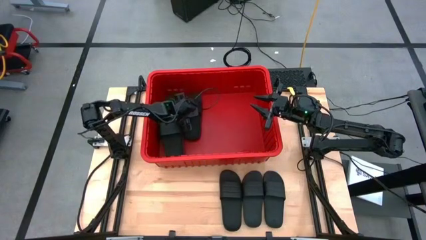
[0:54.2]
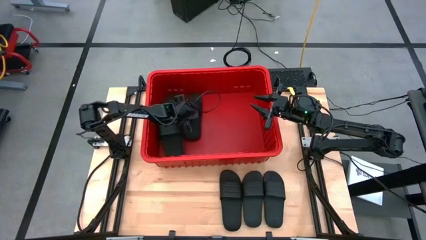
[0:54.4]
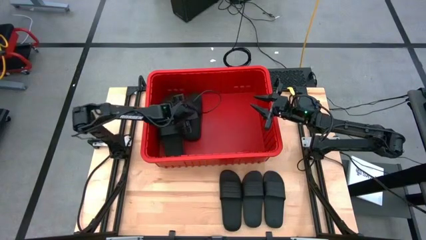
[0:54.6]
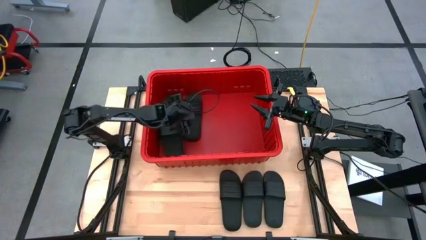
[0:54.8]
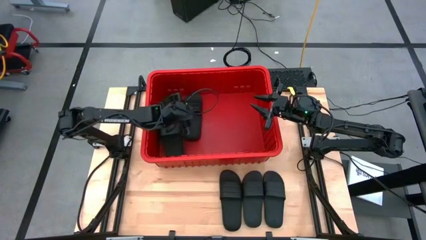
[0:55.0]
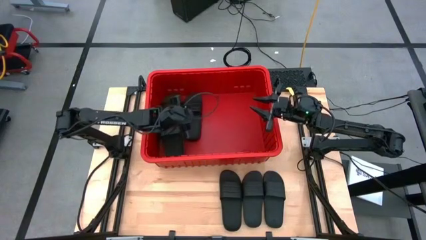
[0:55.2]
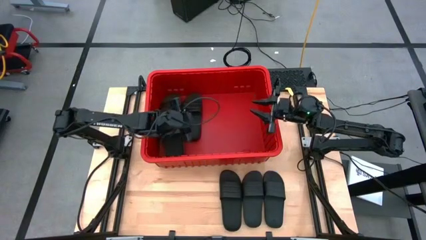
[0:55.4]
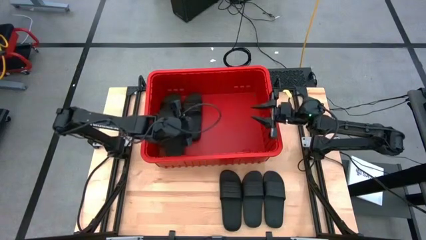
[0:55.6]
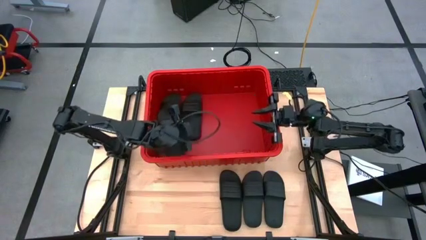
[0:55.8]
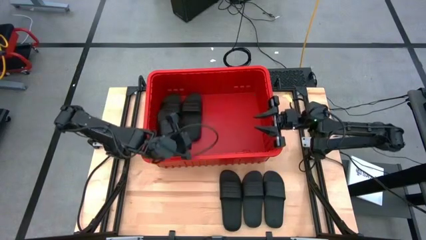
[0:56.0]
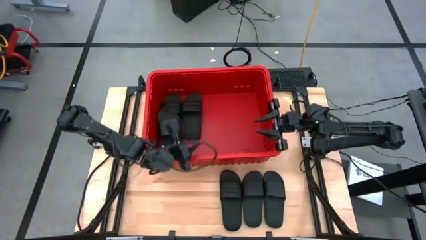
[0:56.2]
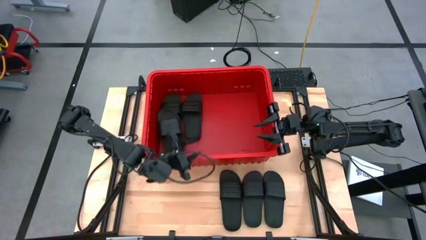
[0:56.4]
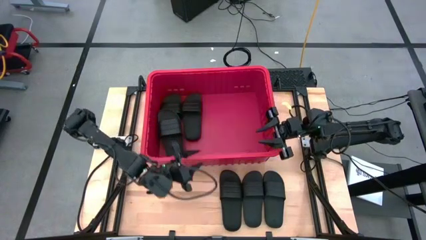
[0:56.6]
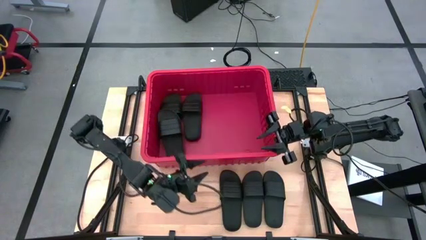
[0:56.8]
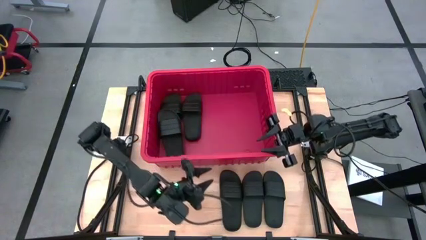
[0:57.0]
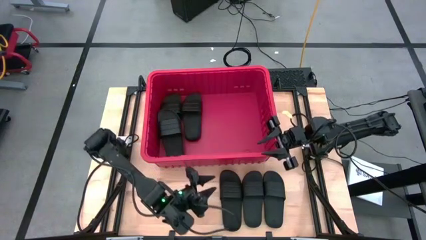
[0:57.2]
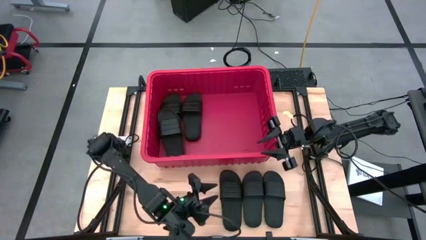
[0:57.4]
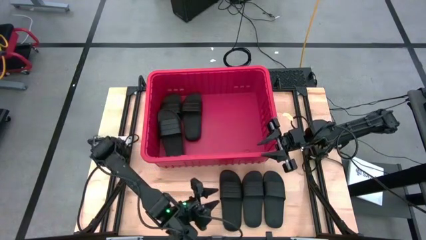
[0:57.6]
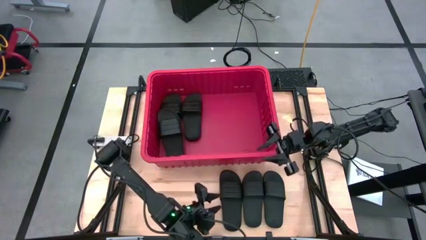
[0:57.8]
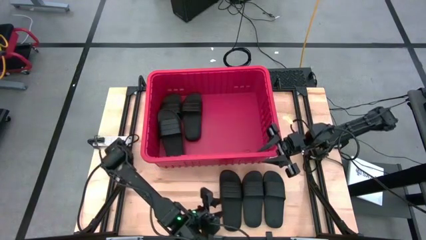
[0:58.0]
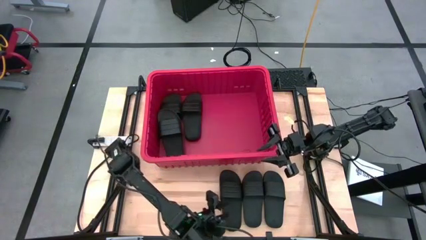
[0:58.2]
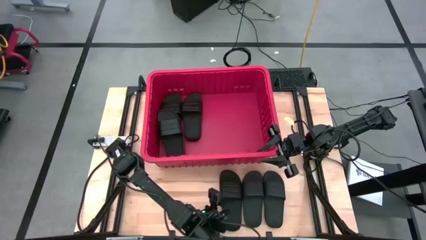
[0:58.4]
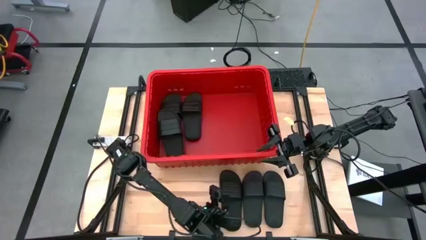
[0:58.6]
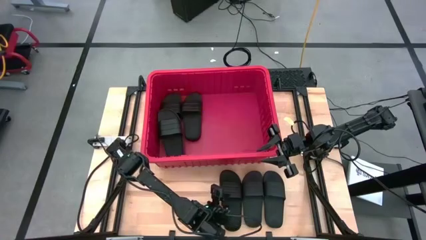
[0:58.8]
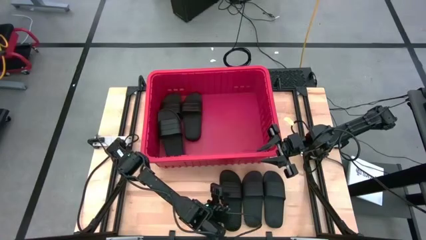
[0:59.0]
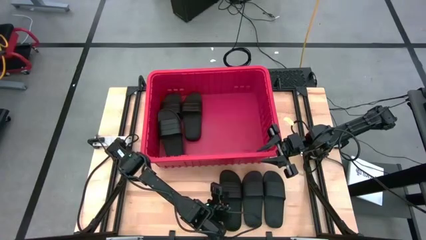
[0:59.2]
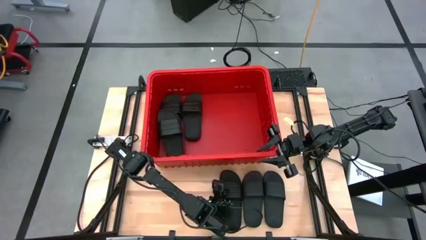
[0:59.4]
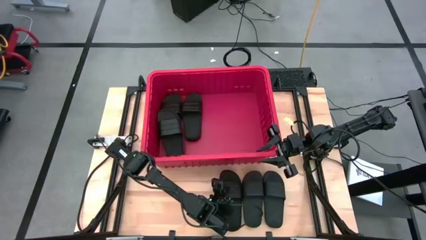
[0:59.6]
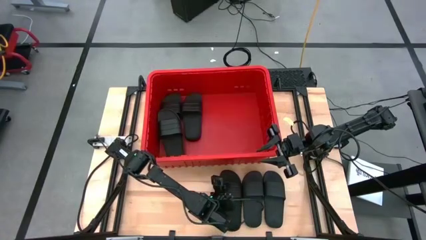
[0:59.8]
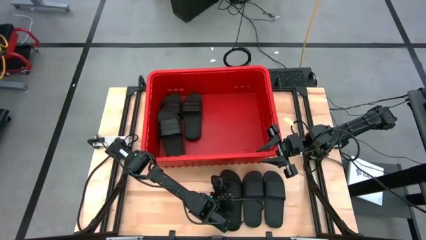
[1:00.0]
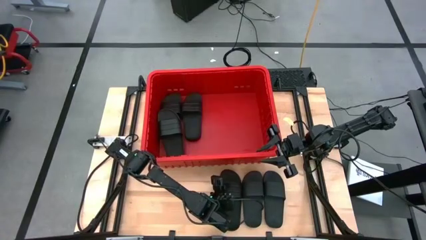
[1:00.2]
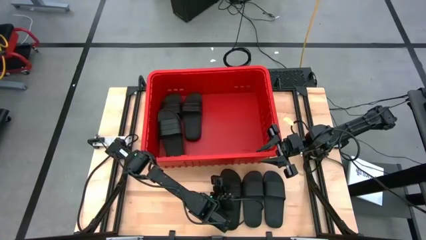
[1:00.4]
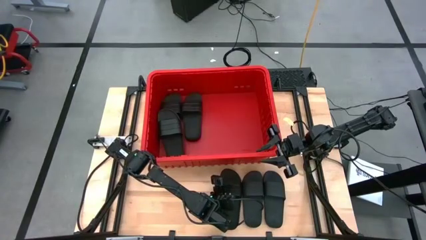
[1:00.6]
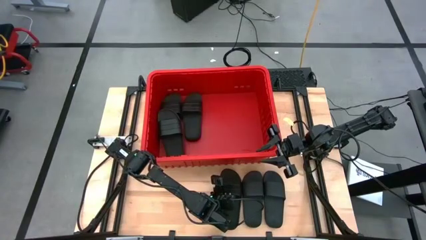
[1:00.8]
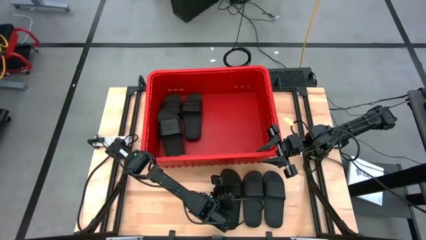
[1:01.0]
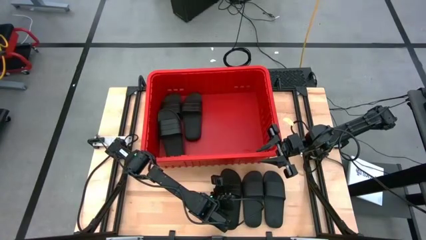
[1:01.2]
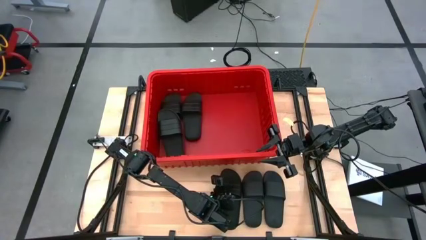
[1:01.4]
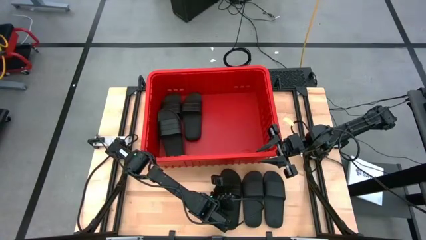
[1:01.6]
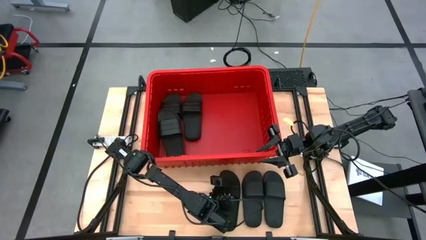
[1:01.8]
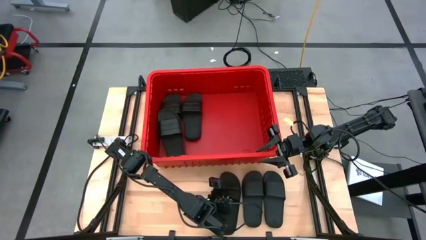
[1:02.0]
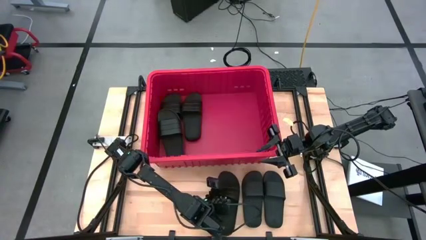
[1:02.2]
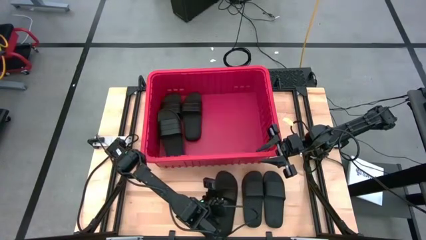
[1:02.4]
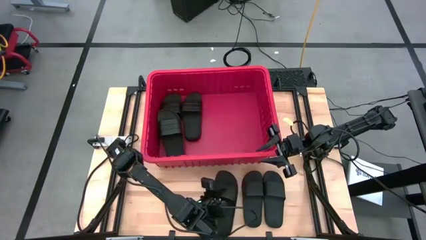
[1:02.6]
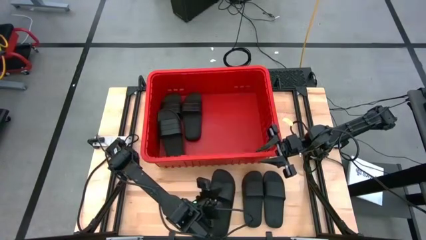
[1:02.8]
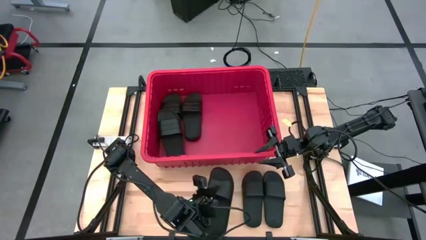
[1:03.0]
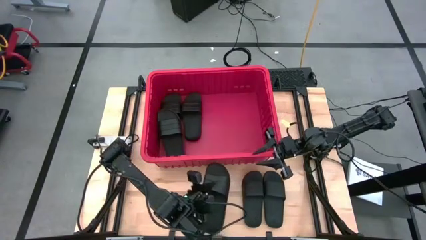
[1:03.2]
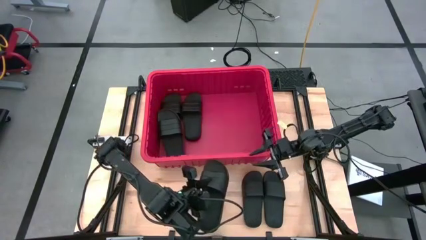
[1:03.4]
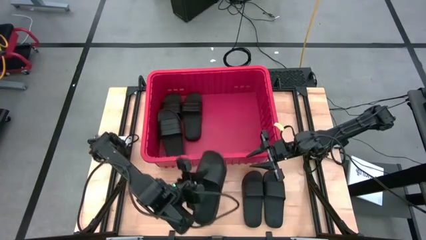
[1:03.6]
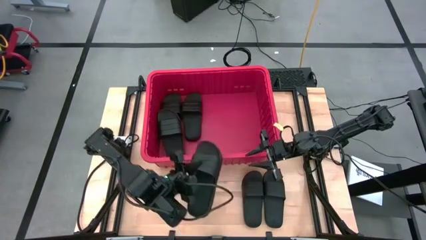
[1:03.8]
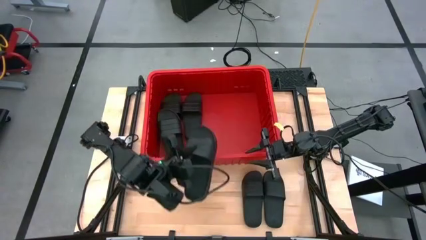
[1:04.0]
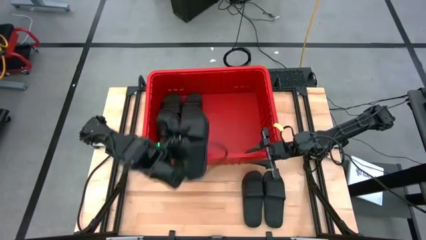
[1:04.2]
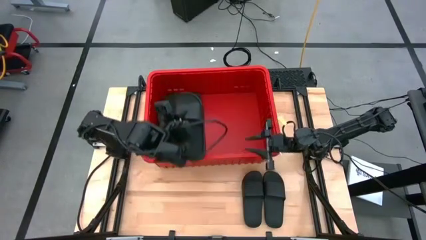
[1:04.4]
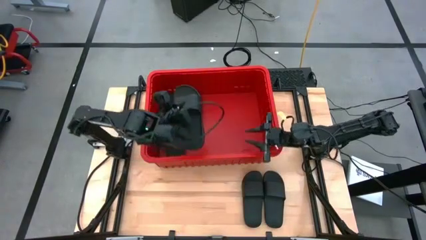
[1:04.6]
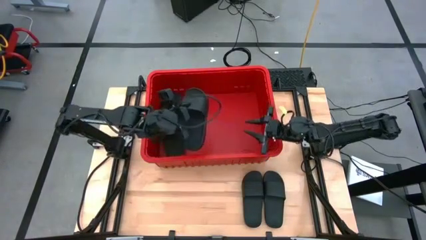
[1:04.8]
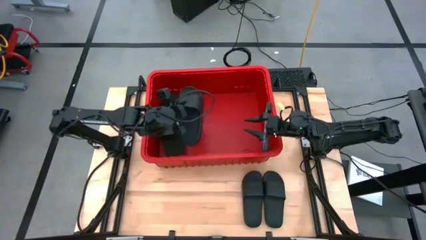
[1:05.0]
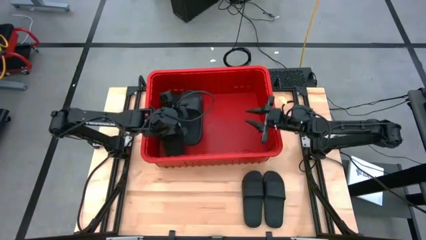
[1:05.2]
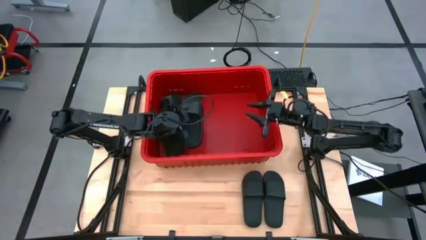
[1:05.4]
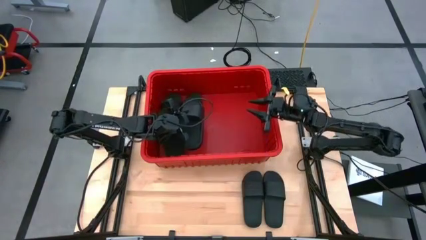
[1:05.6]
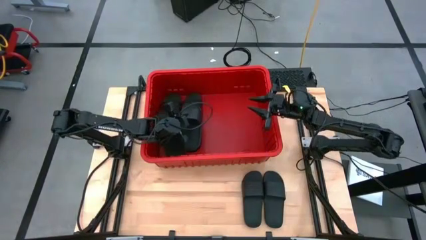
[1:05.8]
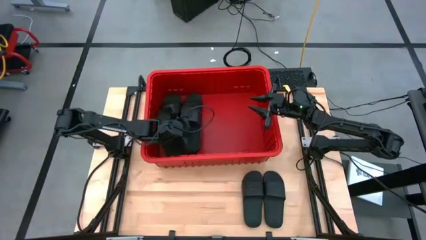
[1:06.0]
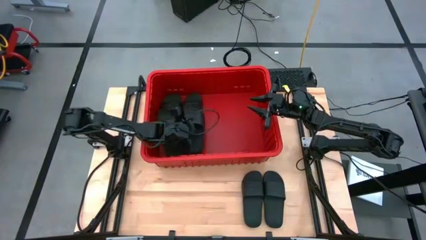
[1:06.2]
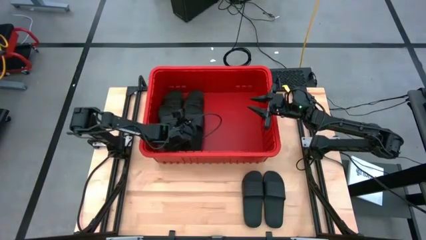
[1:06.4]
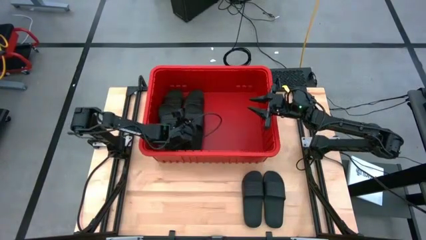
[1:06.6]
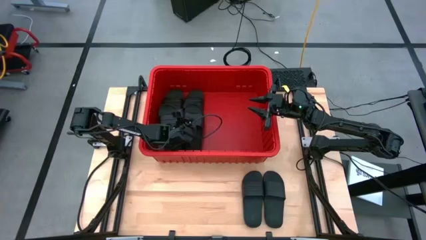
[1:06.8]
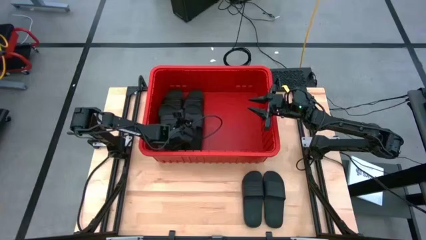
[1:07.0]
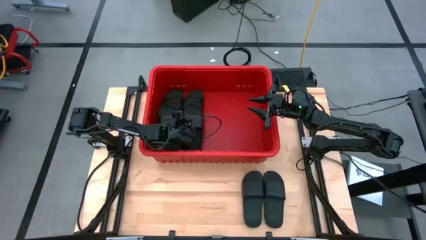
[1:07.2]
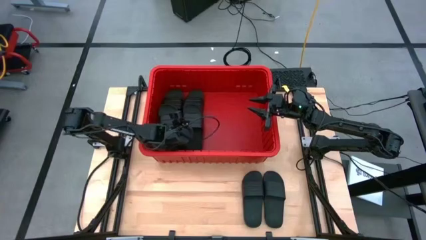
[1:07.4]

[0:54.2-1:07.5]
Task: Pick and place slides into bin
Put the left black slide into the red bin
